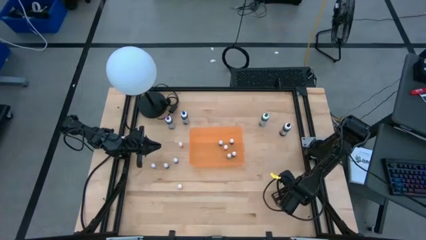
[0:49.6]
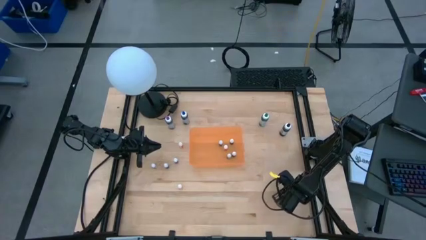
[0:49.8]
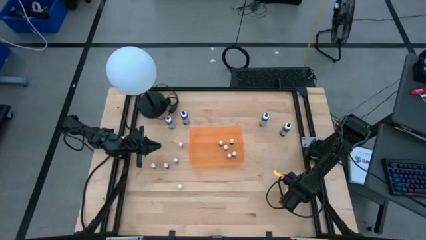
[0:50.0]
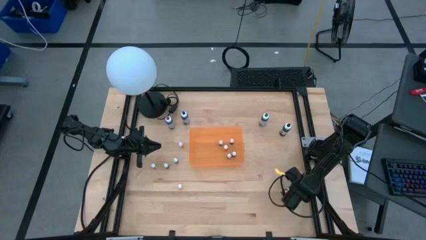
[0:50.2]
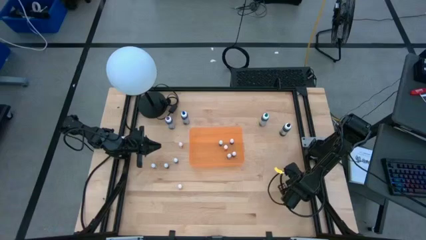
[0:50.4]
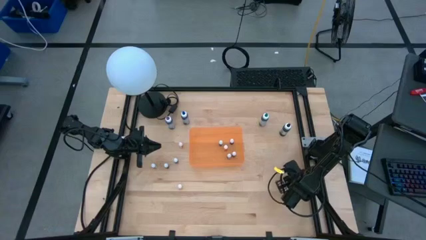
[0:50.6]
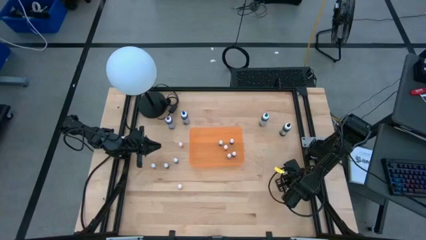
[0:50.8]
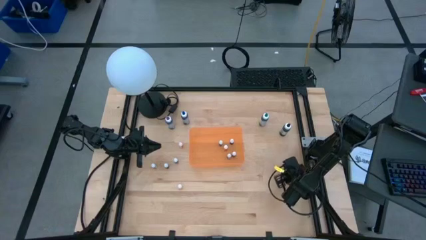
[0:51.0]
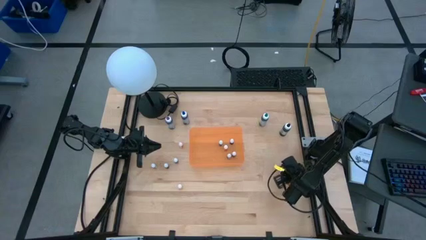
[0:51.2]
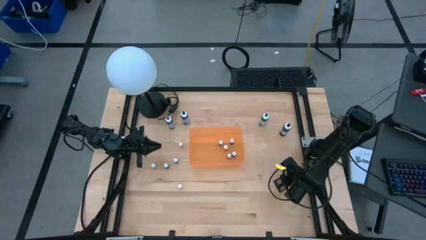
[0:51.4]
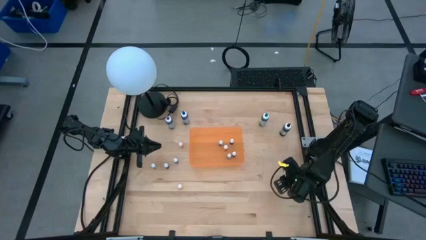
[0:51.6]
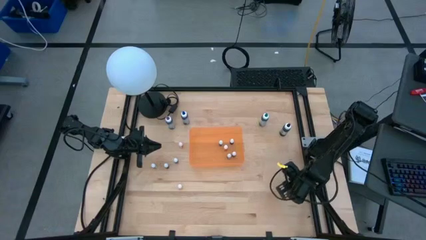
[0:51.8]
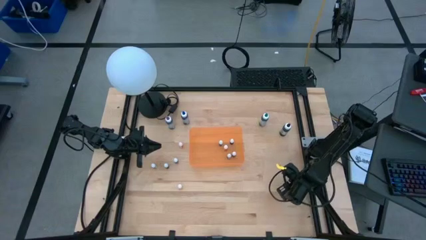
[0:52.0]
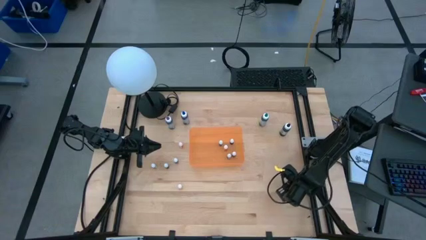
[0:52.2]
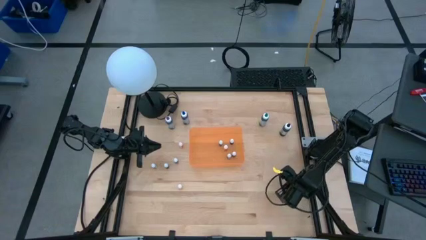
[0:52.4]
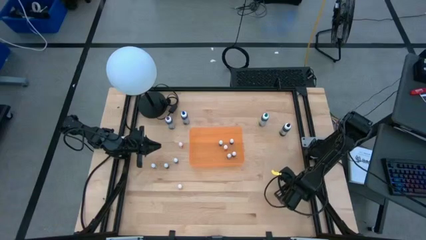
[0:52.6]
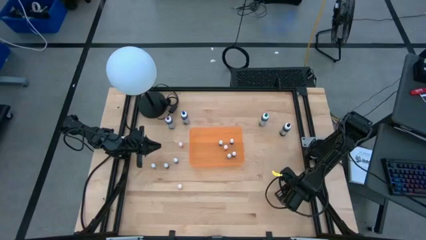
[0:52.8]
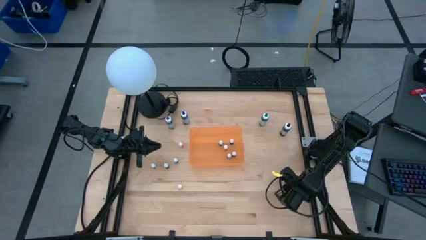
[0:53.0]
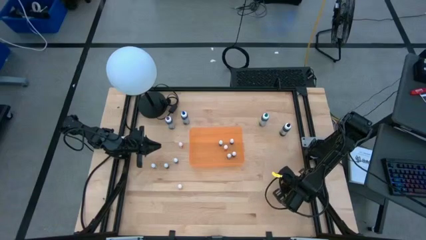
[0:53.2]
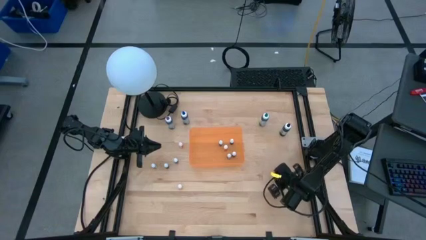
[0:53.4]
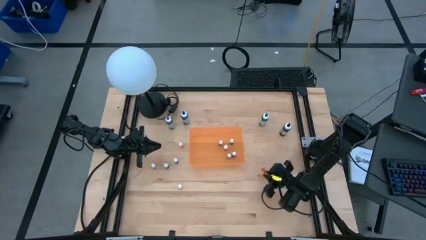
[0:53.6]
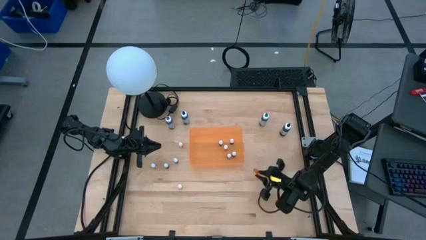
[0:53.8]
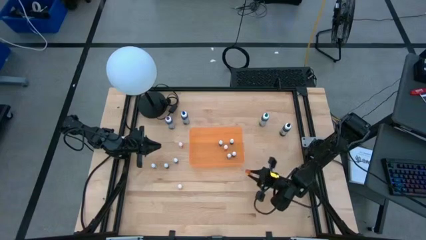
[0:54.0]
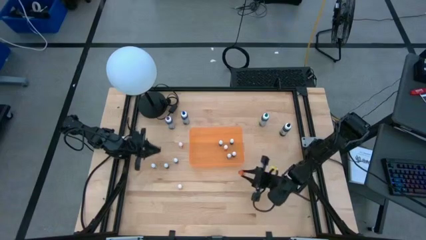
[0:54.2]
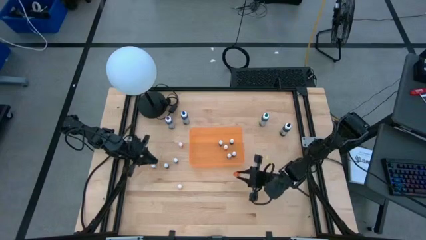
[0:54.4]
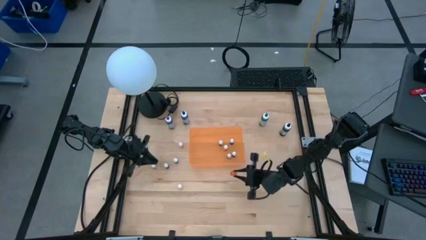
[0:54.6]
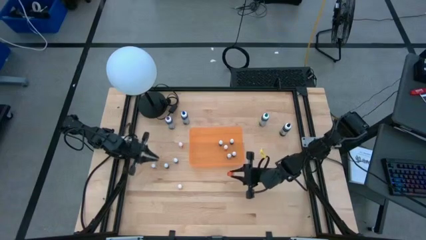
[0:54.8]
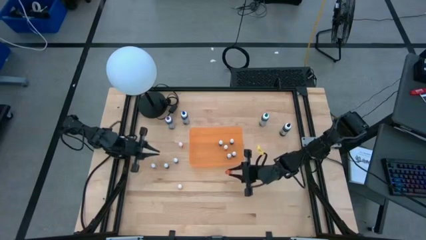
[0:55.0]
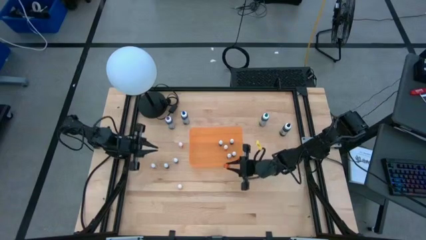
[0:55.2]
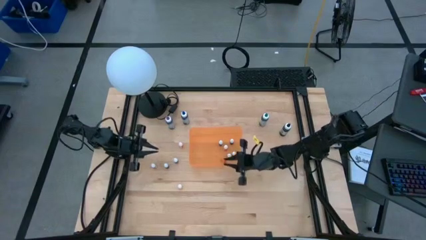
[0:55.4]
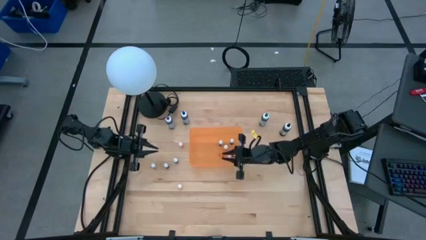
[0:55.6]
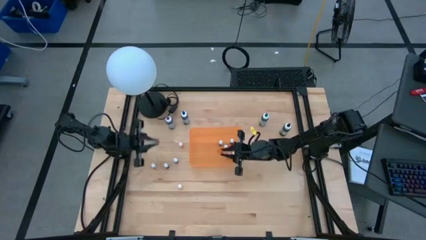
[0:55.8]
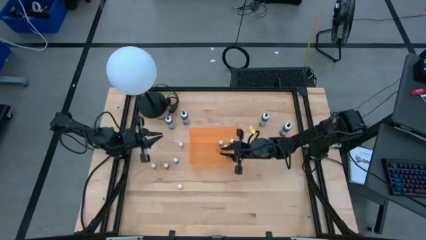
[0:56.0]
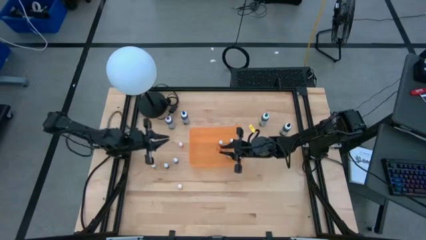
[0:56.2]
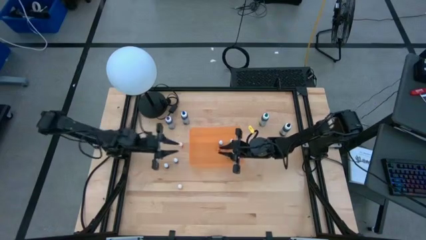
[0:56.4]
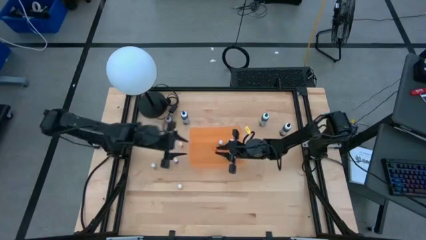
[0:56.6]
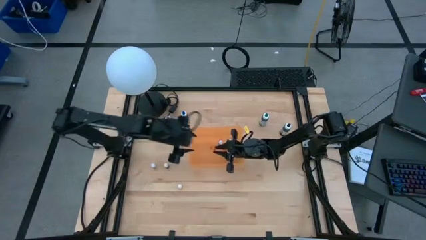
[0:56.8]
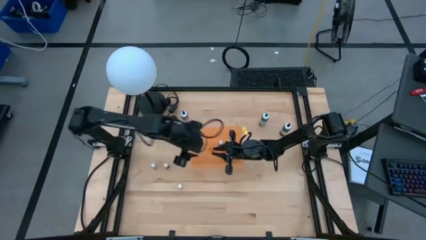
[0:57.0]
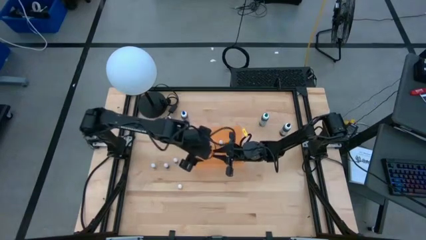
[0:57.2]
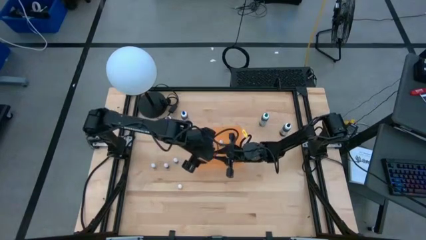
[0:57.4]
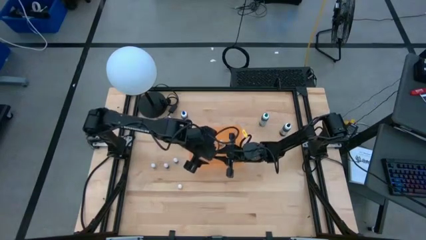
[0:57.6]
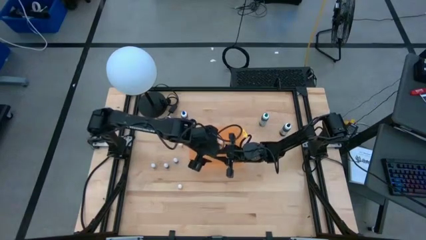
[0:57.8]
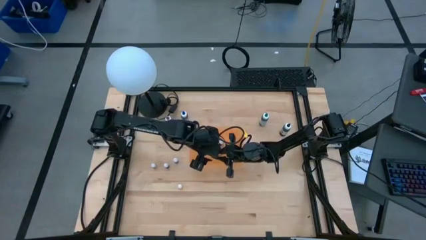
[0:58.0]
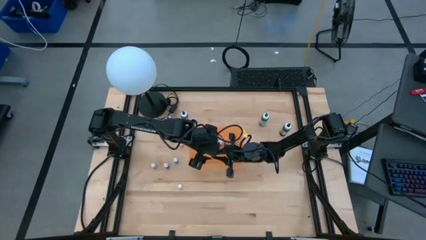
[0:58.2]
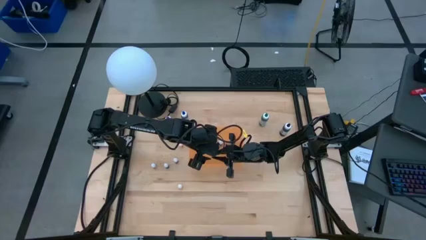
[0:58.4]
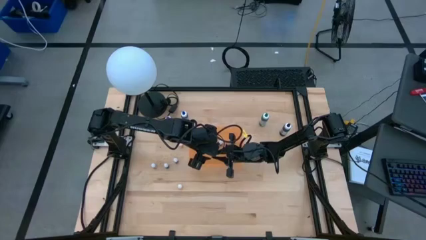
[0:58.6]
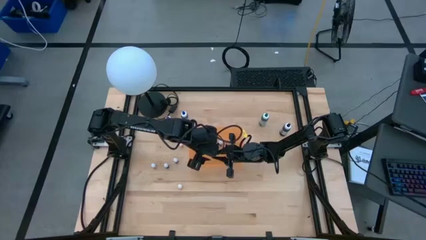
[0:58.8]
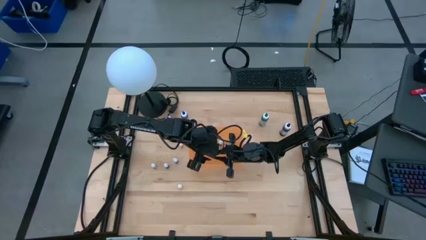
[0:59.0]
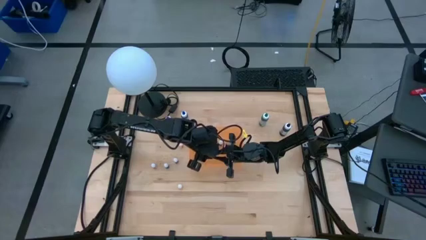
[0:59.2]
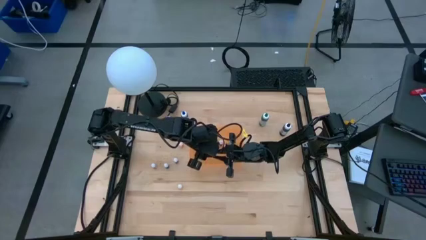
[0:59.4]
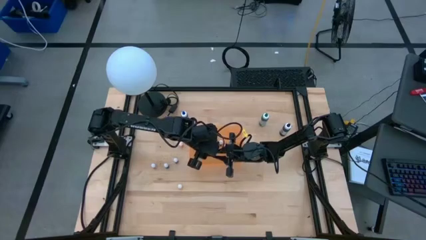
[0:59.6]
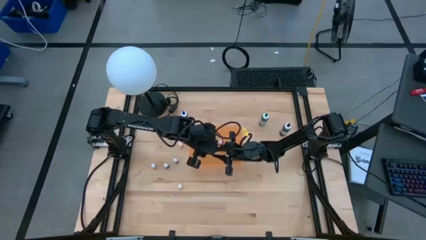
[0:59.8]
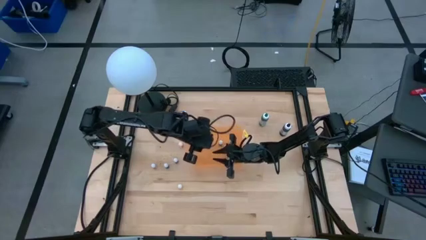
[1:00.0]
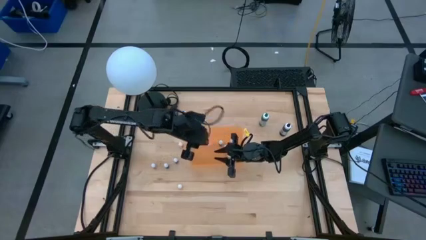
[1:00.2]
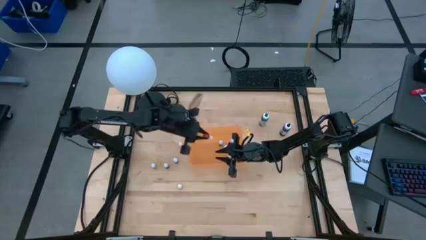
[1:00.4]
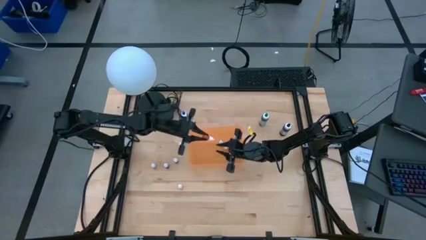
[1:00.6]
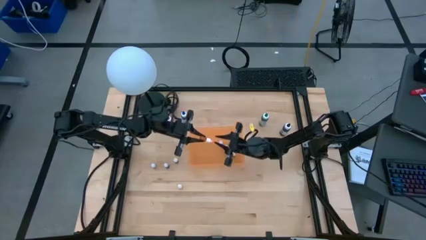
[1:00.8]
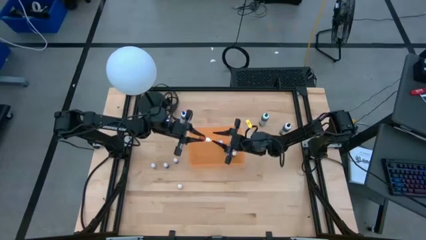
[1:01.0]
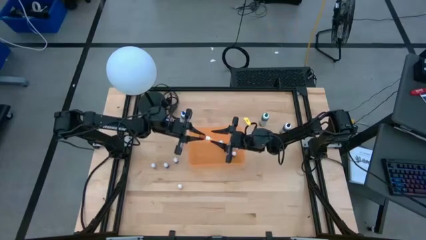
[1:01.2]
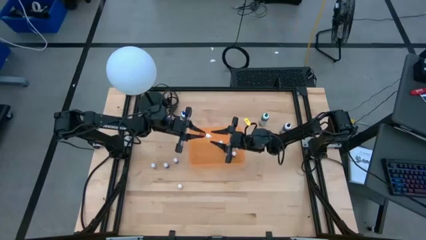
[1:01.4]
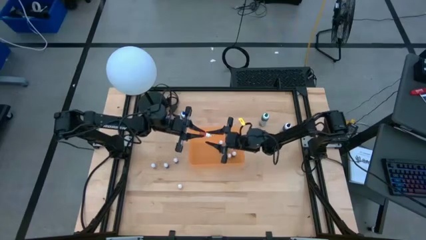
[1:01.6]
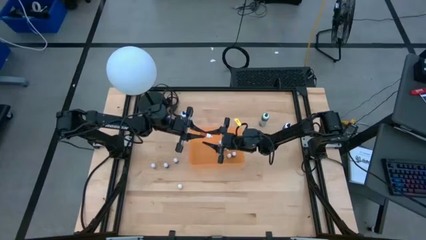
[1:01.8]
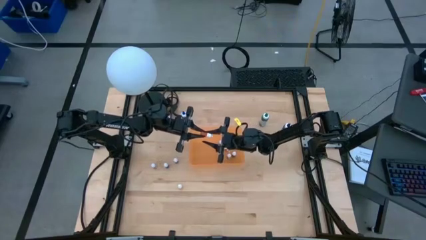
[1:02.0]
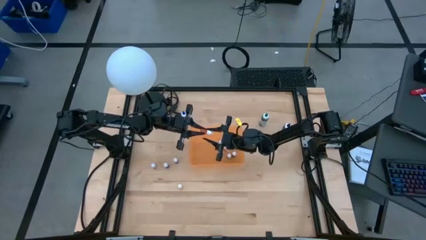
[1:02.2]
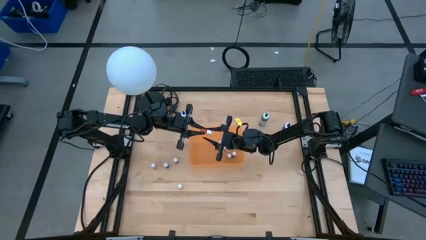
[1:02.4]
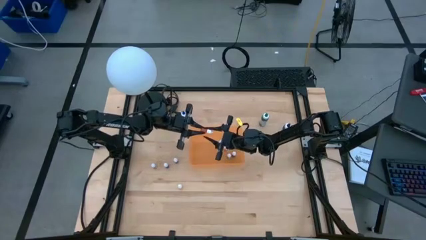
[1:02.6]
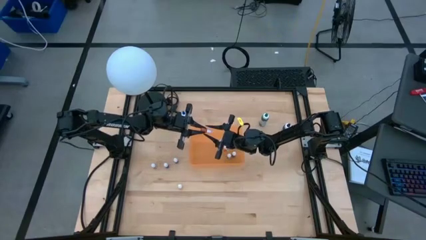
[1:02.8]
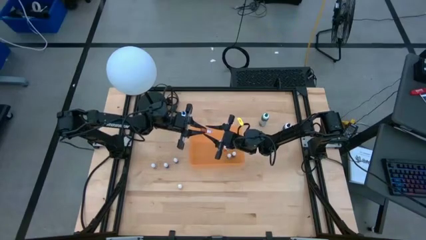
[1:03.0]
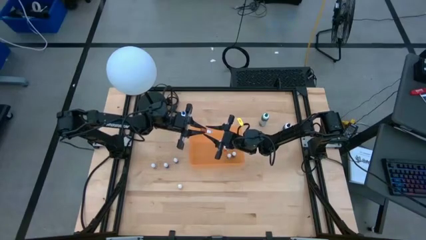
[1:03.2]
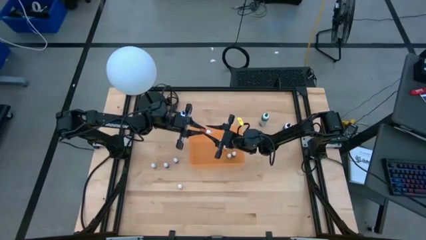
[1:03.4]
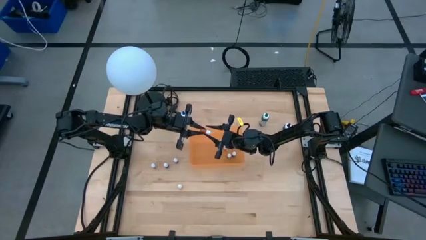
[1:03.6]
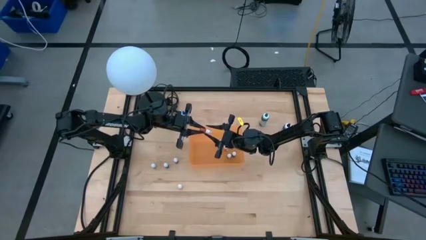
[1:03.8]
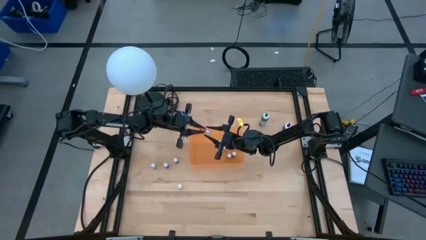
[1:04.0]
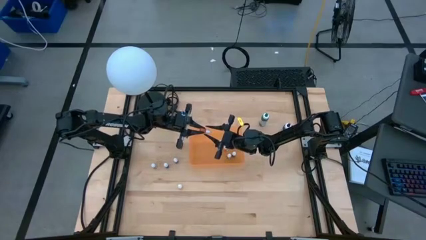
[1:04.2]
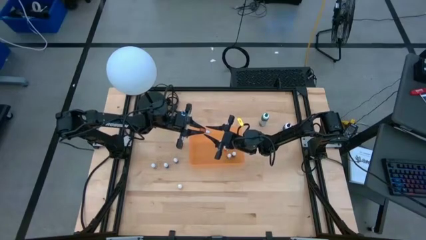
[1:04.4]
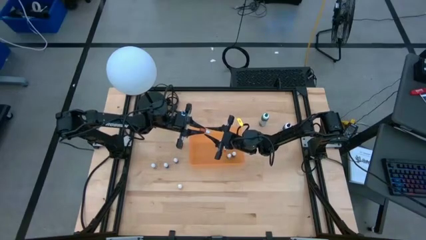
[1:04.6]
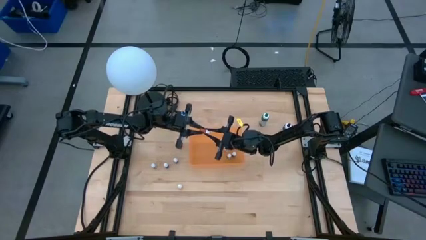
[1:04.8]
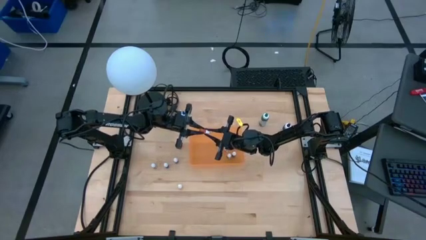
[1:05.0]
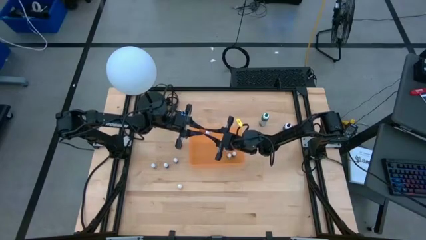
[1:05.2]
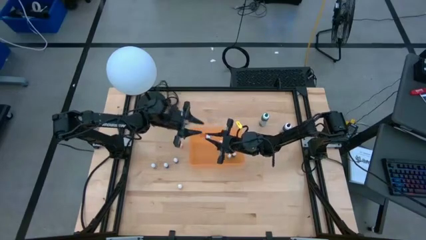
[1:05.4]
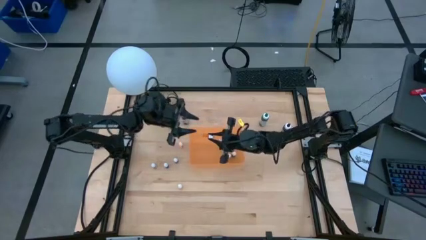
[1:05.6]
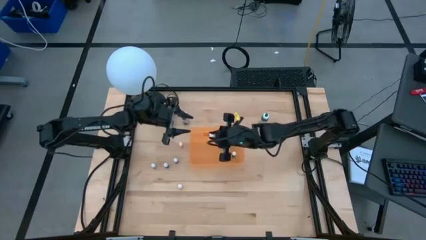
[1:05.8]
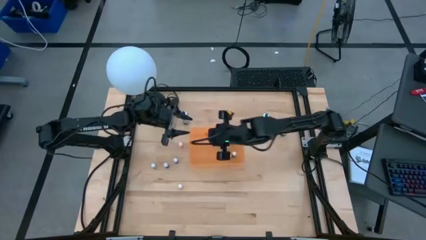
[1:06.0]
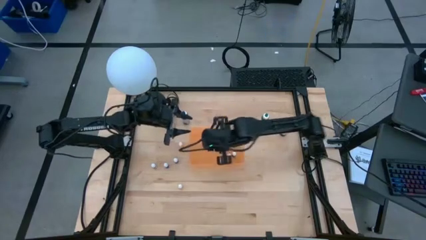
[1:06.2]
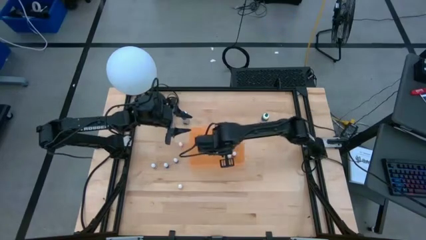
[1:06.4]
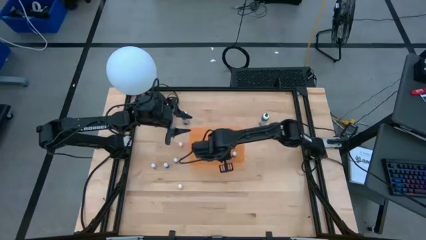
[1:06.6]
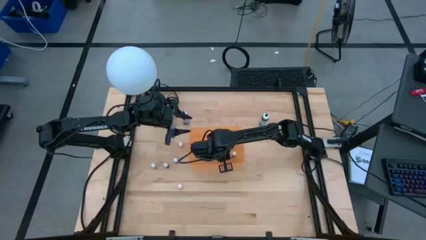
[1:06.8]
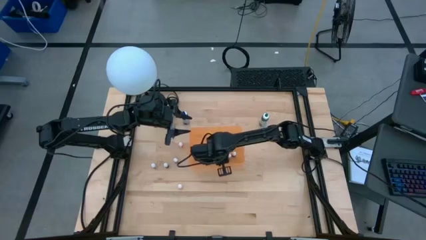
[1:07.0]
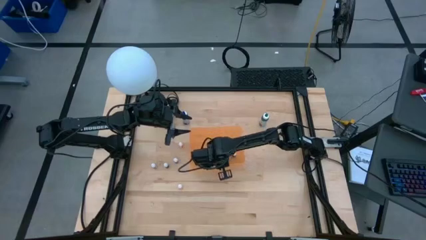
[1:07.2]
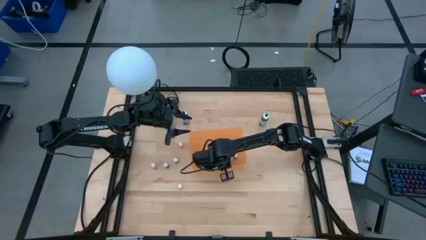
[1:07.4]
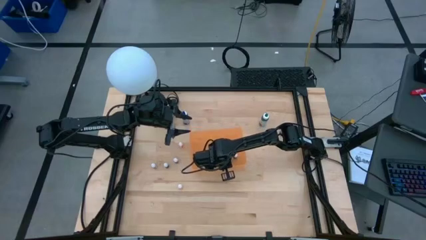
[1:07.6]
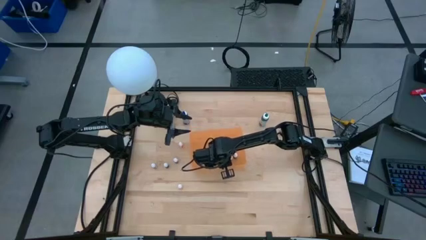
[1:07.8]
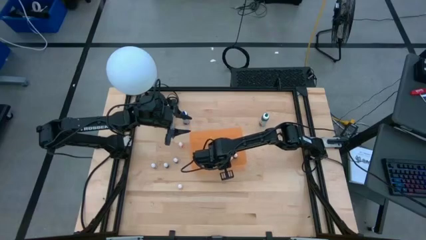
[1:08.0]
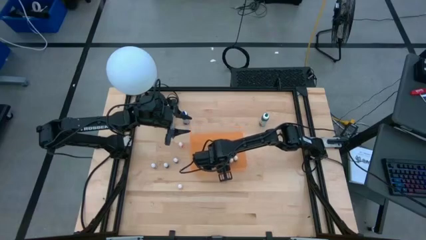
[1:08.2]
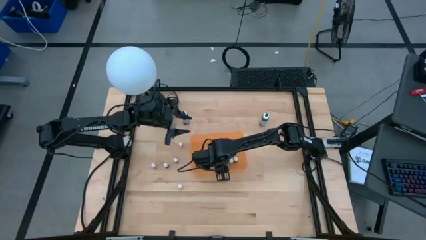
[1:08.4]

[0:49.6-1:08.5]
Task: Pick & Place food coloring
Put the small orange food coloring bottle into the orange bin
